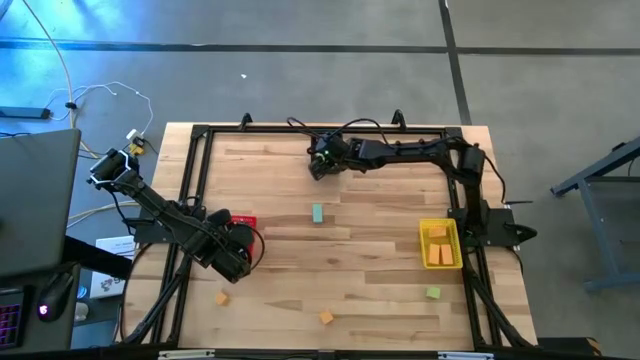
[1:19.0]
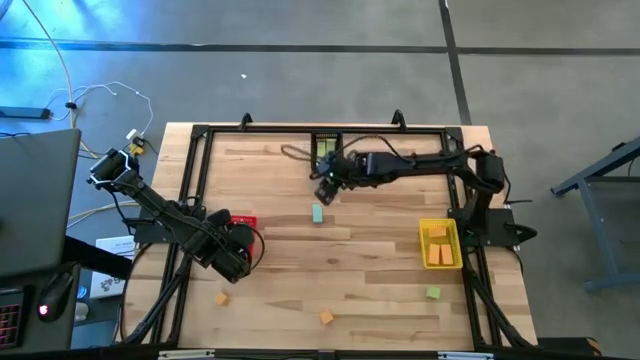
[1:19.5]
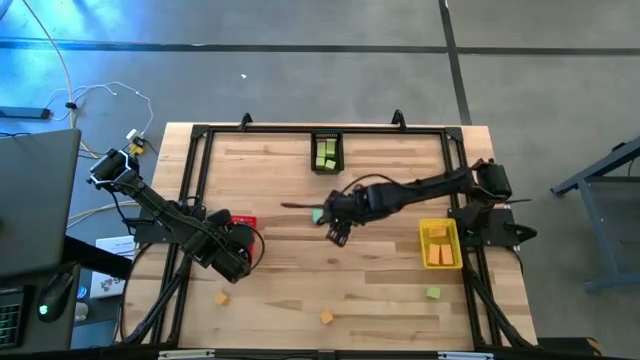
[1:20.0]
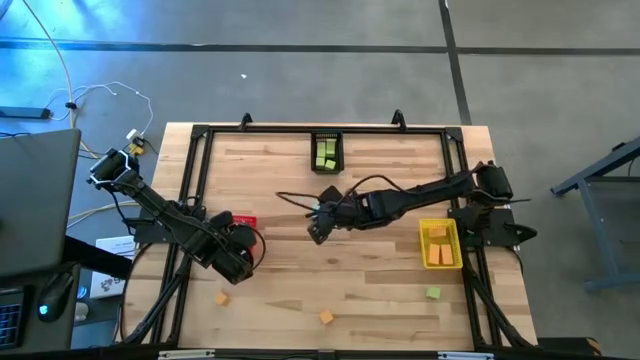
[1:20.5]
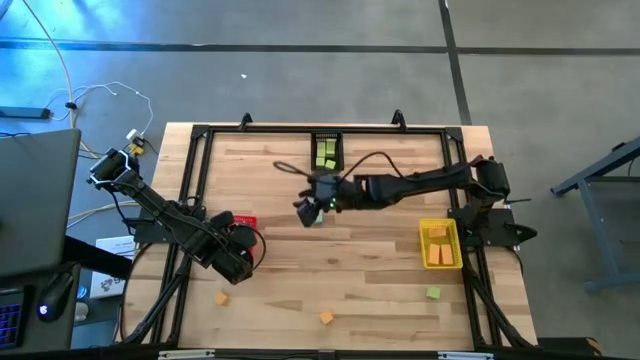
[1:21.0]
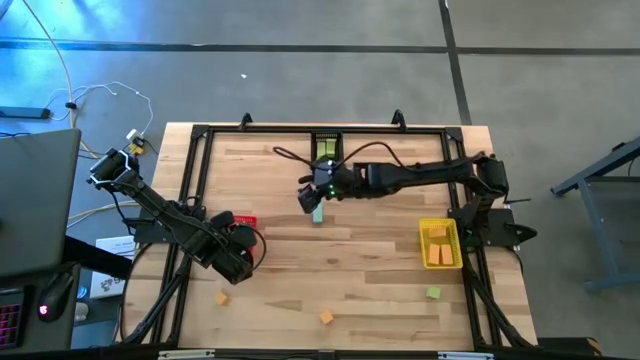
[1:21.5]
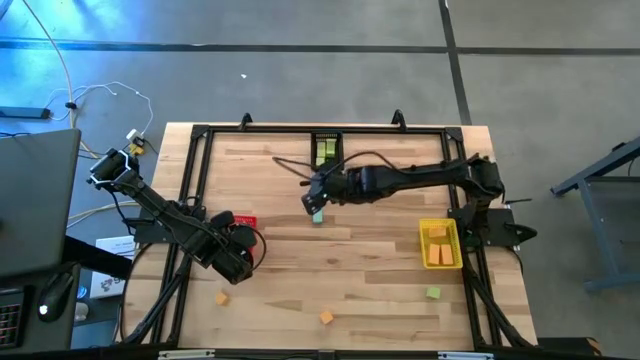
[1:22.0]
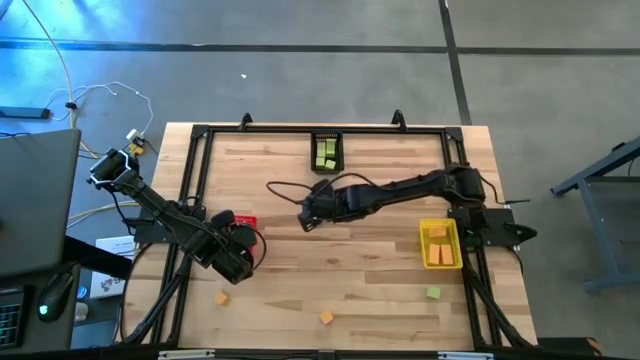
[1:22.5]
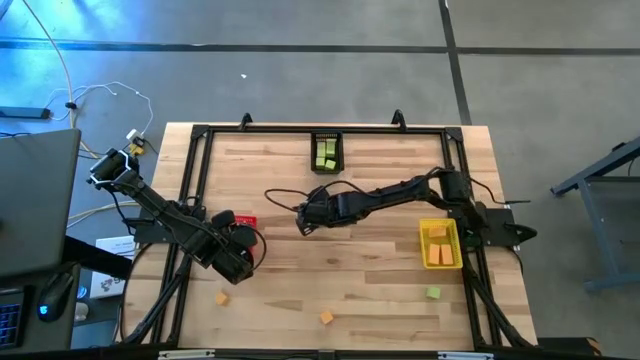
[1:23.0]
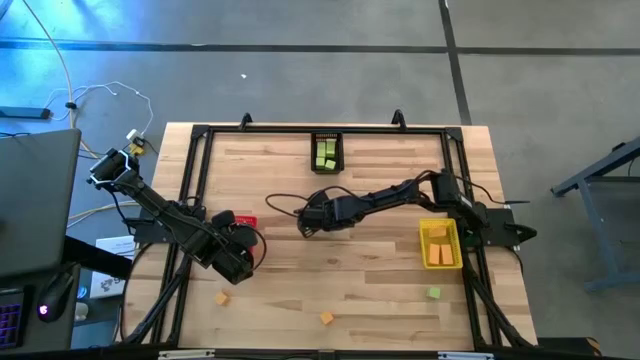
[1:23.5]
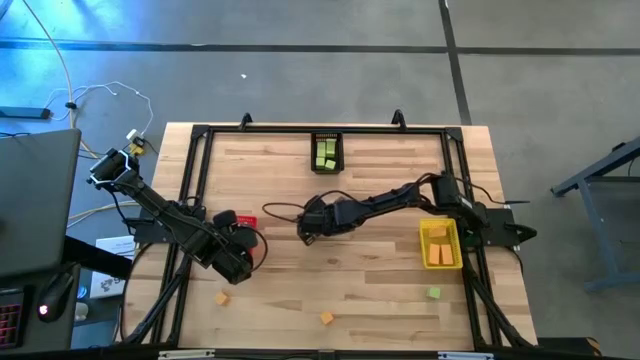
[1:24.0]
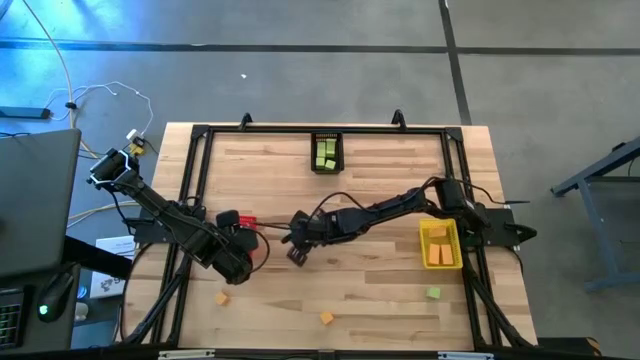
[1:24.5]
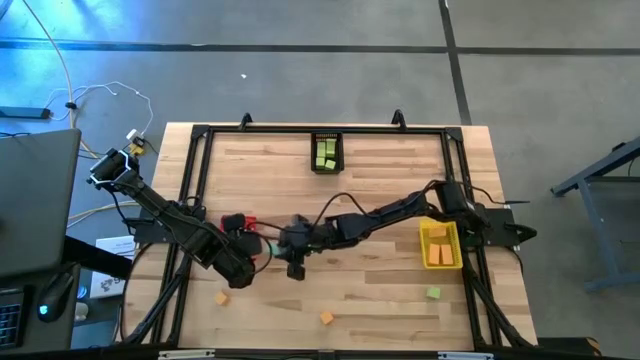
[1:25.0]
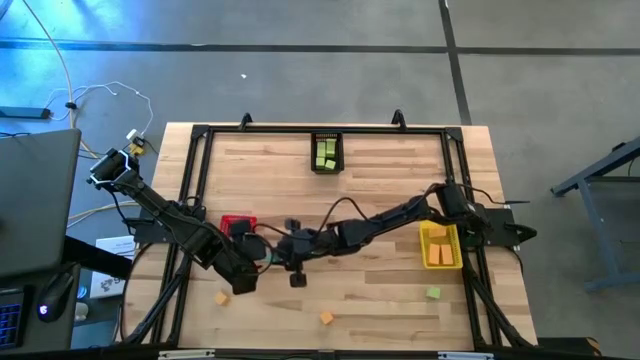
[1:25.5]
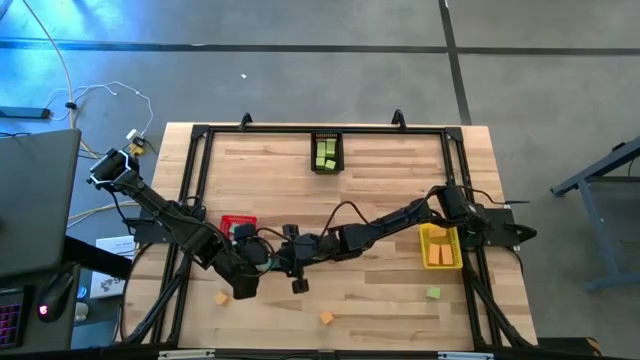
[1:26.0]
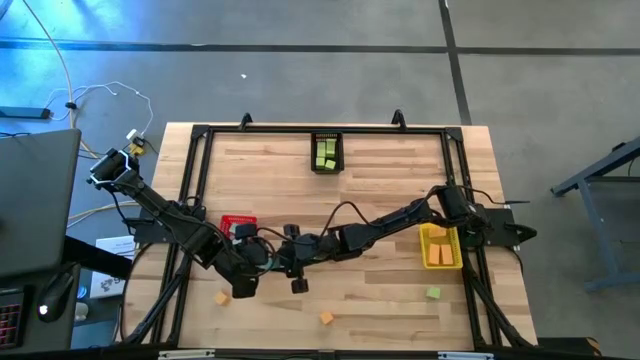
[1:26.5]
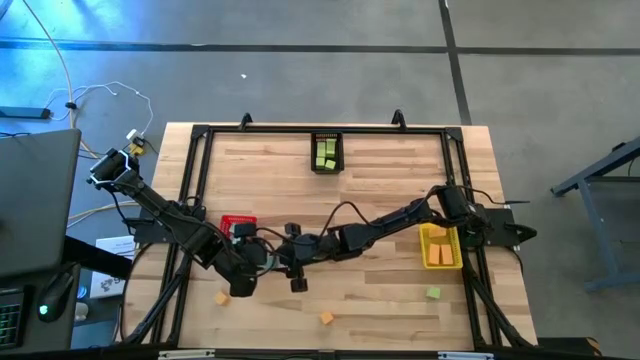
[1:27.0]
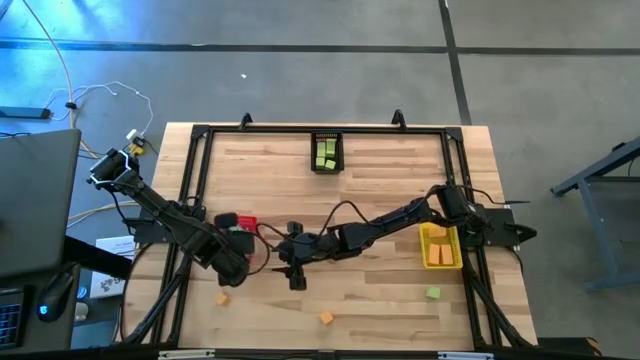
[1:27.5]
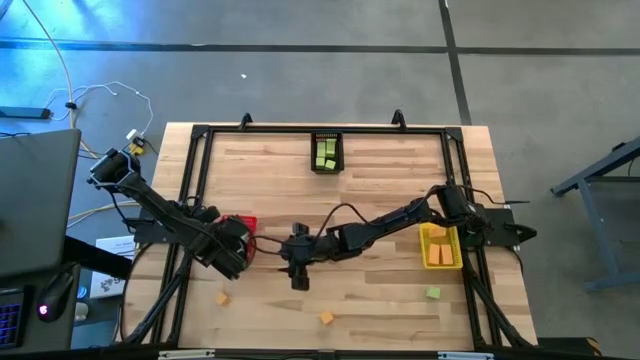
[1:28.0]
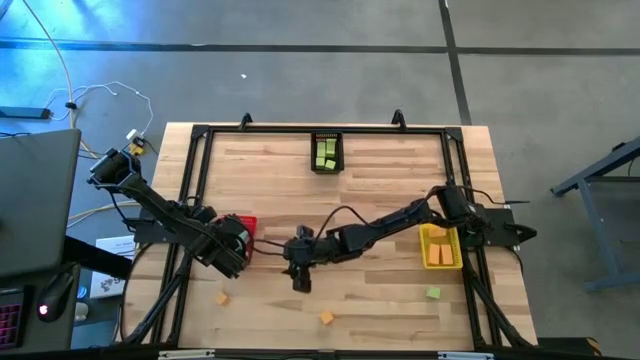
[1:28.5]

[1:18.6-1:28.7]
Task: Sort & place blocks by color
Put the blue block into the red bin

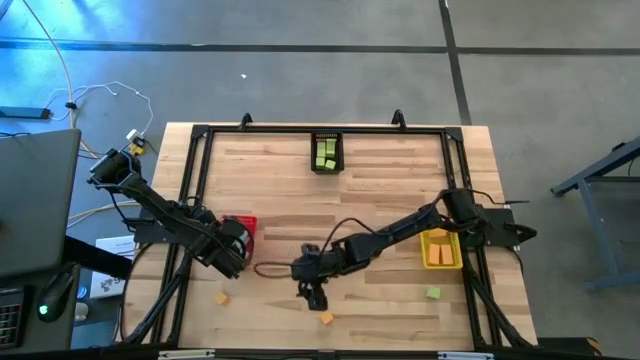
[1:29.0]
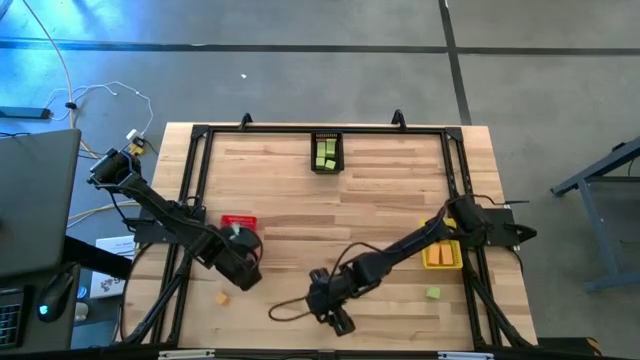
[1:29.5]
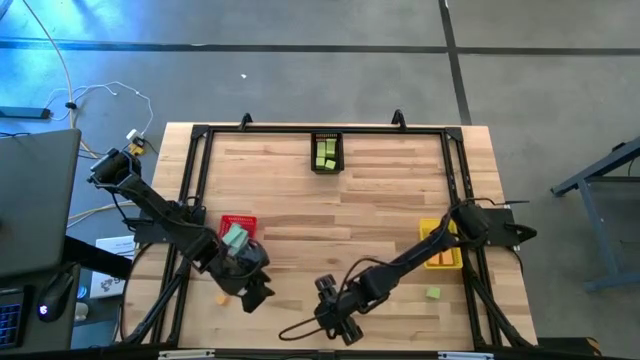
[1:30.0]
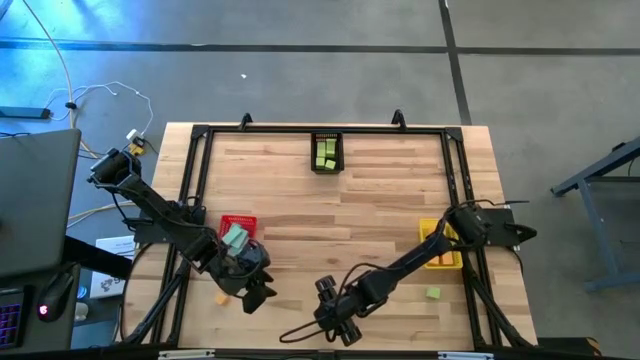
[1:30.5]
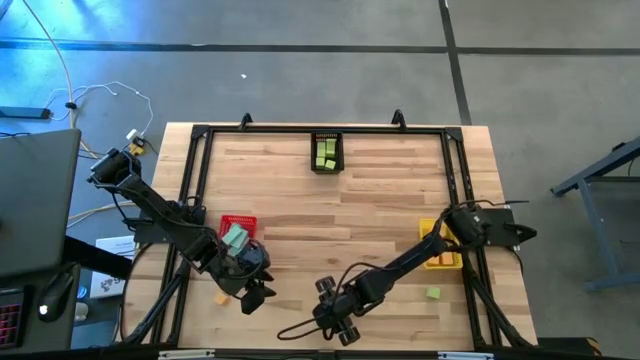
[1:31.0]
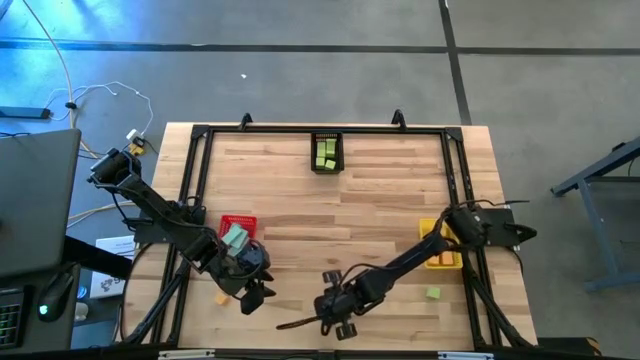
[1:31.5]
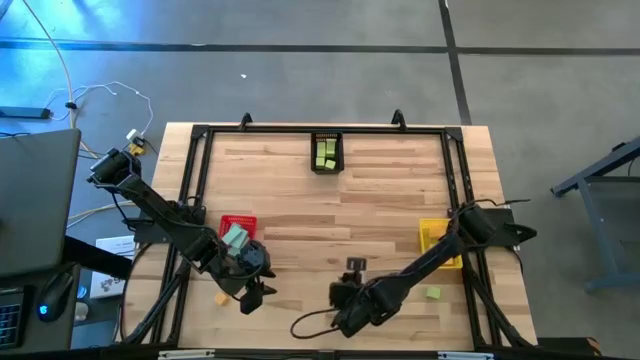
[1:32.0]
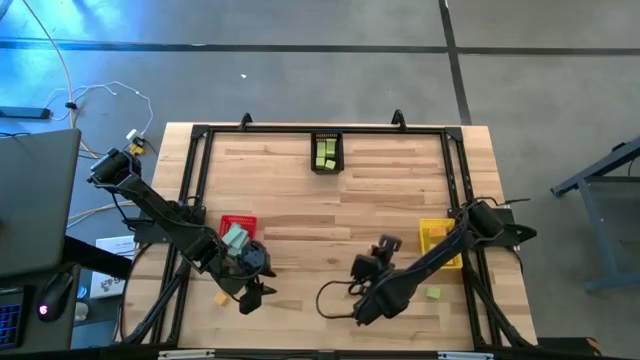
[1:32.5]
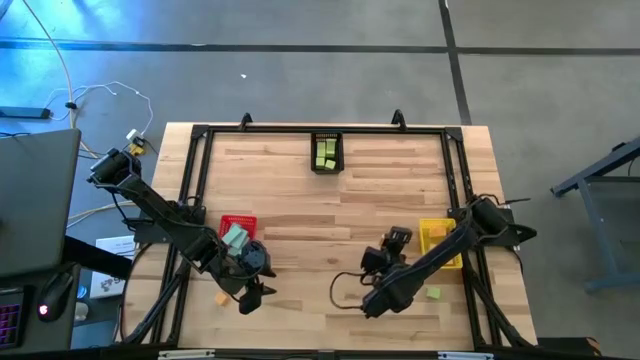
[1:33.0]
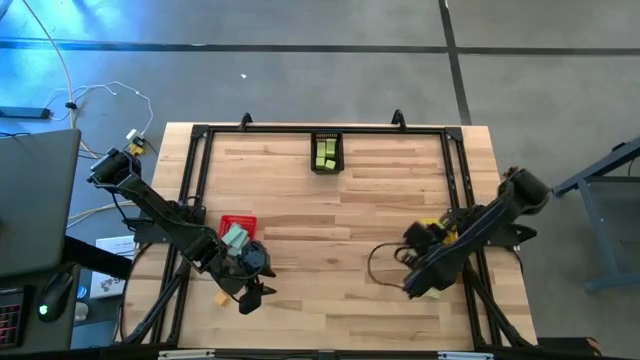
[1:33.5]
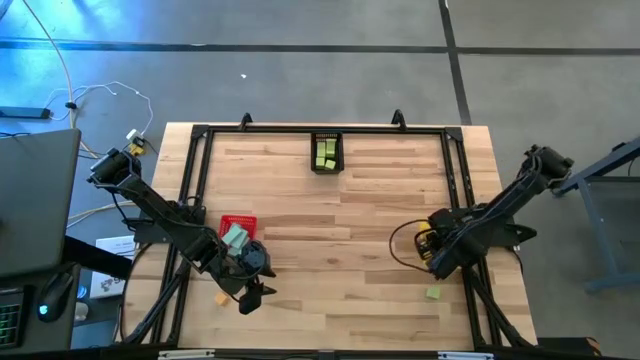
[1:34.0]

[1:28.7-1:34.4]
Put the yellow block into the yellow bin

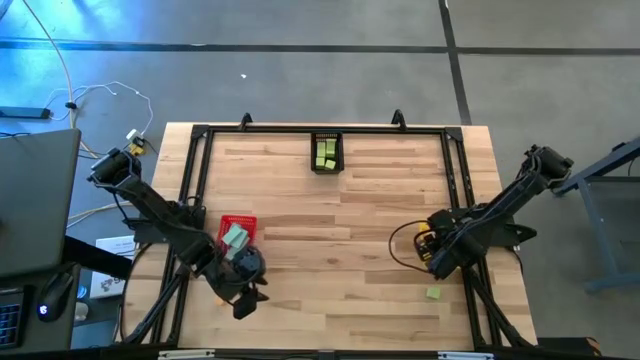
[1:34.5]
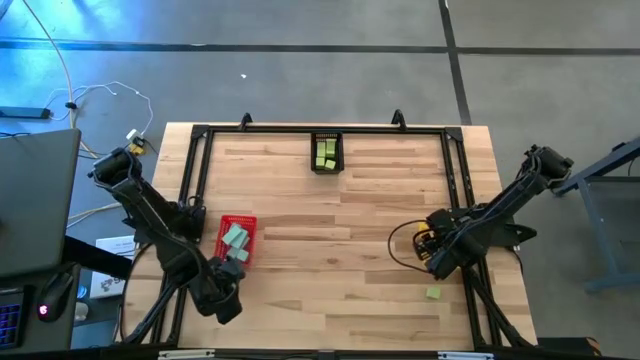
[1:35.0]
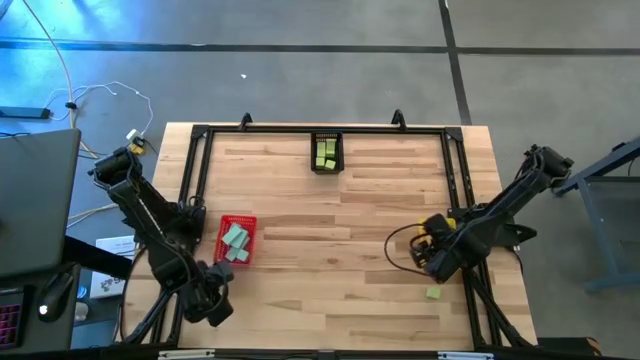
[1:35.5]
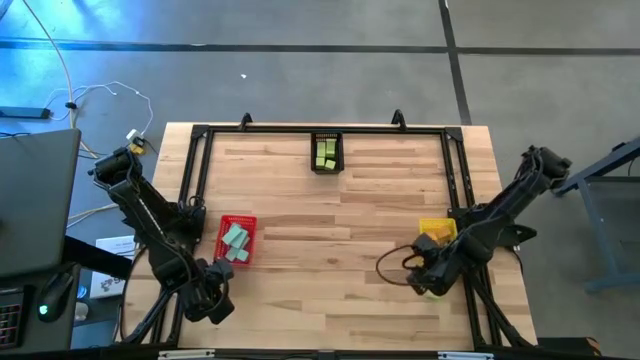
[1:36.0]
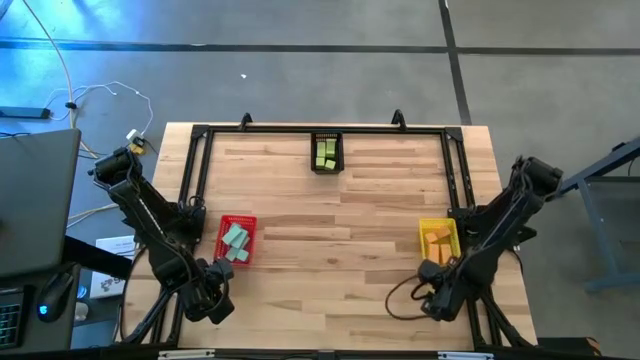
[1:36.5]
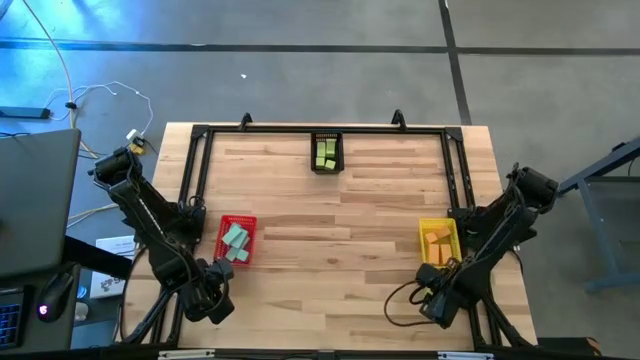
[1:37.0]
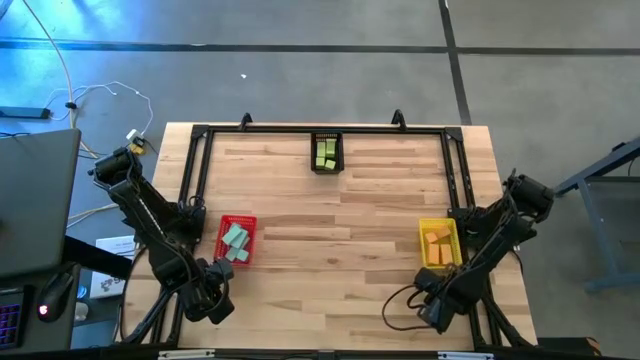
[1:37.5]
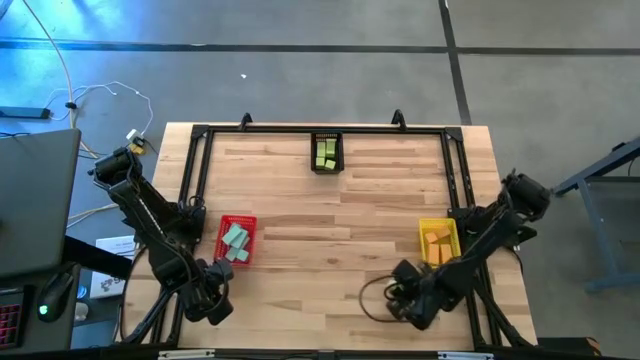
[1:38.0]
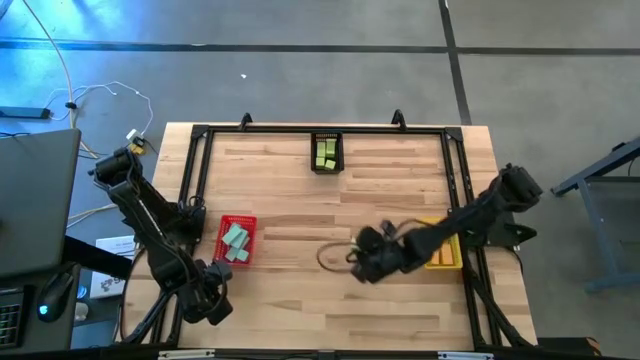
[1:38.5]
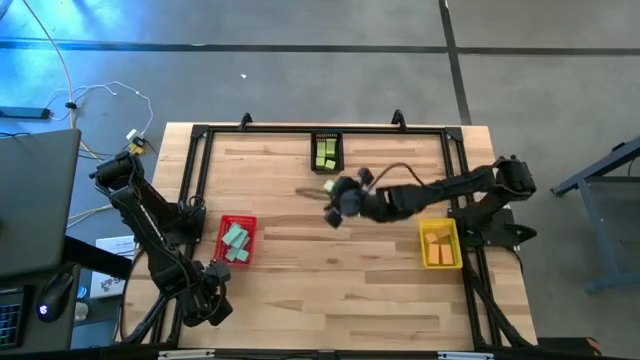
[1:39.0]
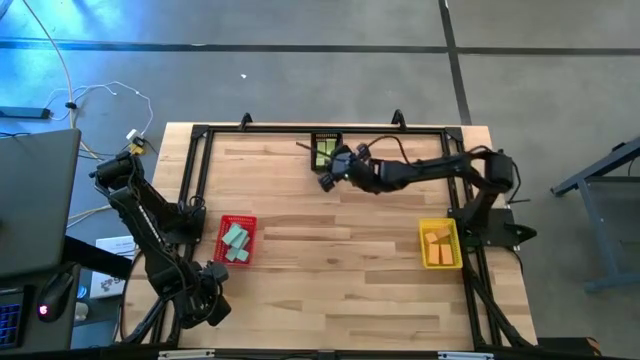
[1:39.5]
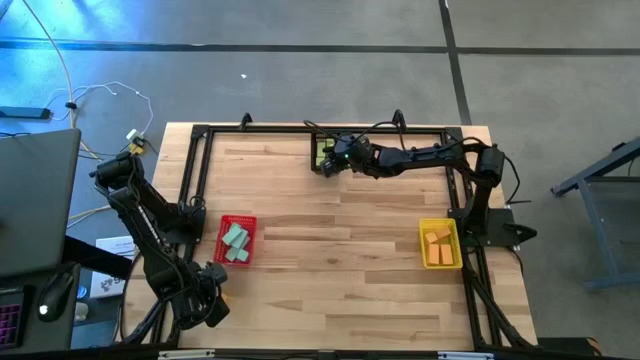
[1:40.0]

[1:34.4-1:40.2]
Put the green block into the black bin
